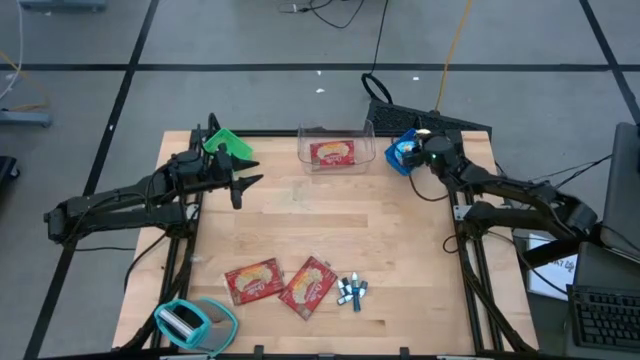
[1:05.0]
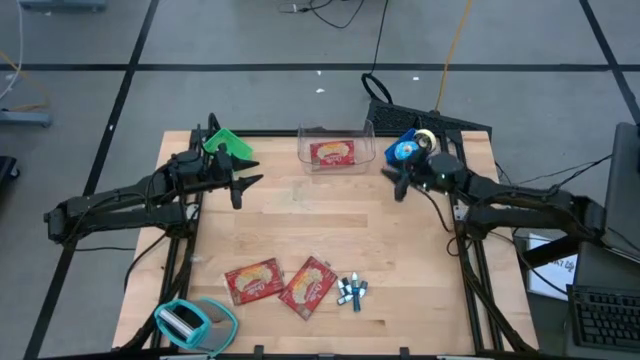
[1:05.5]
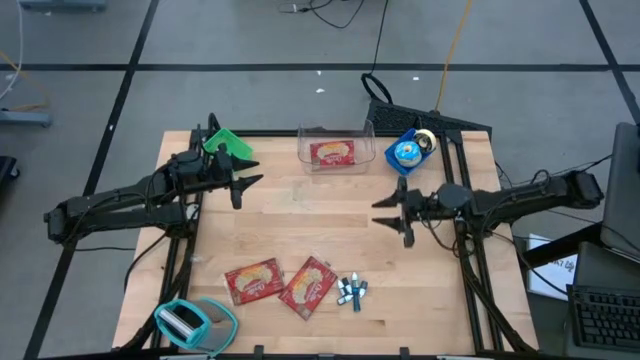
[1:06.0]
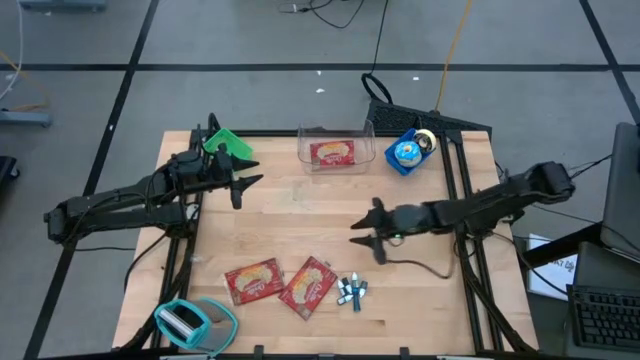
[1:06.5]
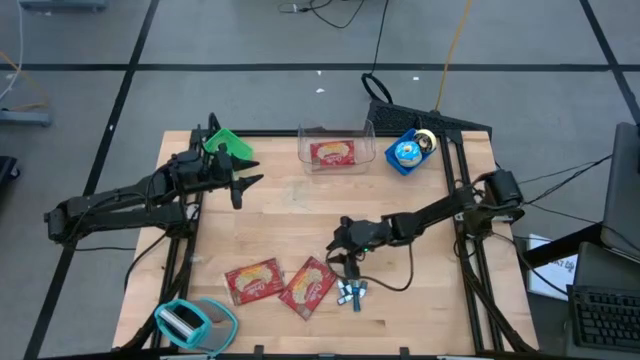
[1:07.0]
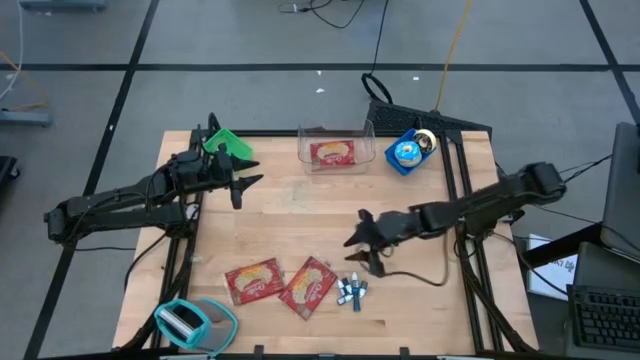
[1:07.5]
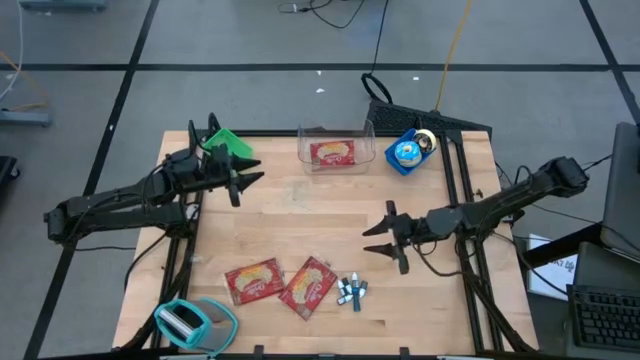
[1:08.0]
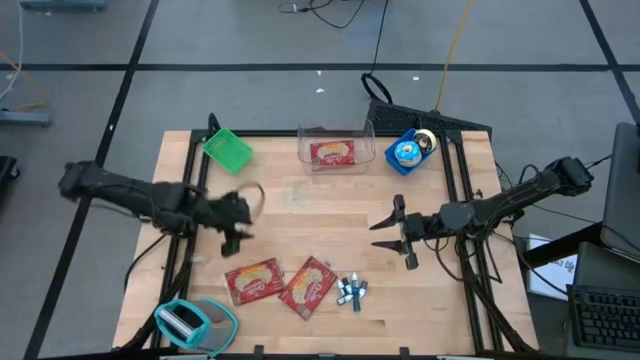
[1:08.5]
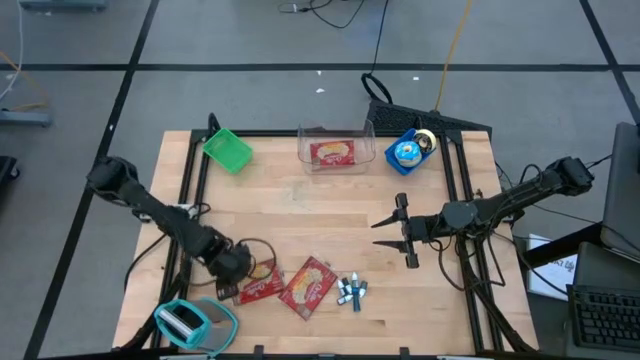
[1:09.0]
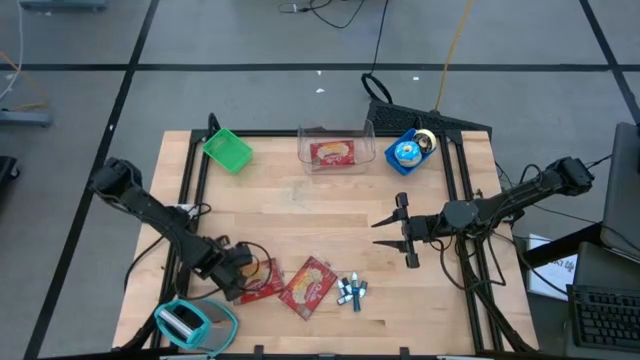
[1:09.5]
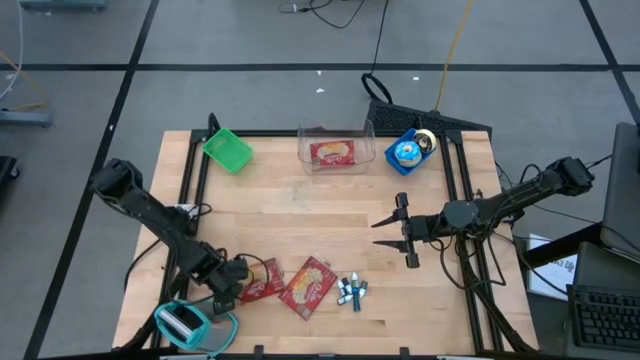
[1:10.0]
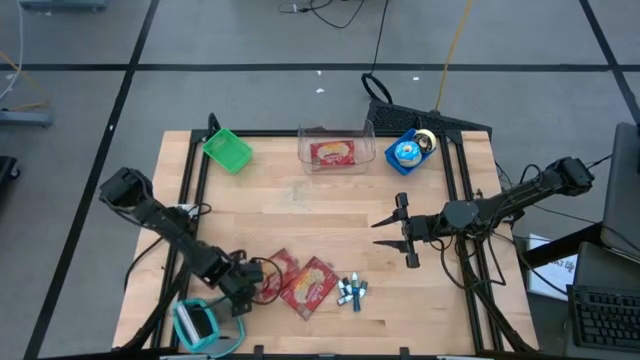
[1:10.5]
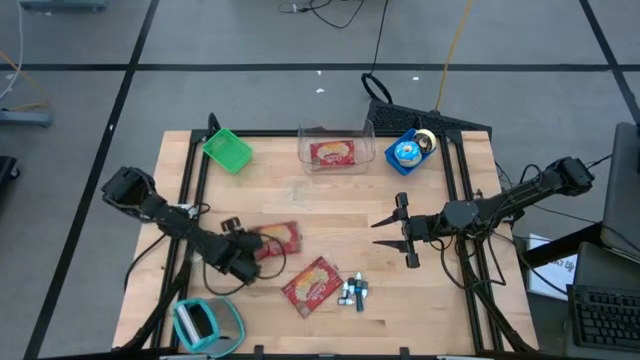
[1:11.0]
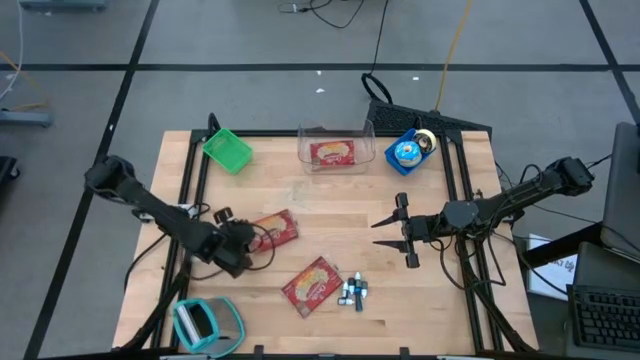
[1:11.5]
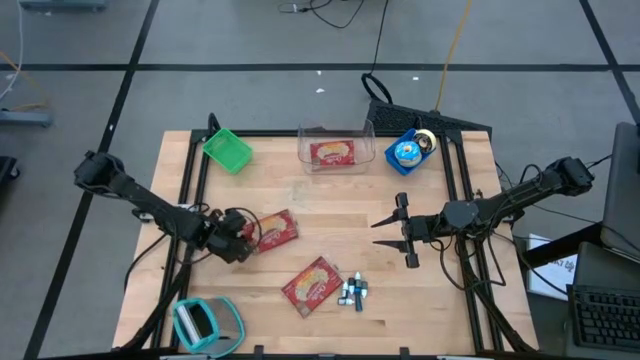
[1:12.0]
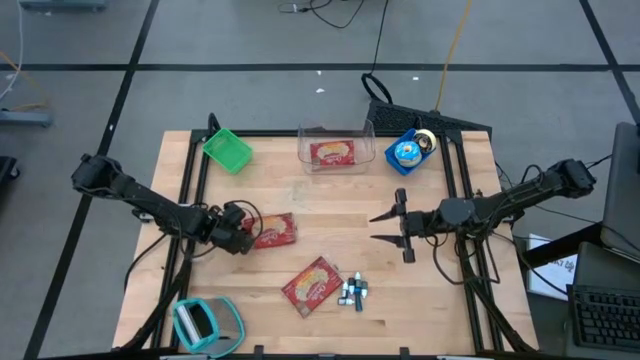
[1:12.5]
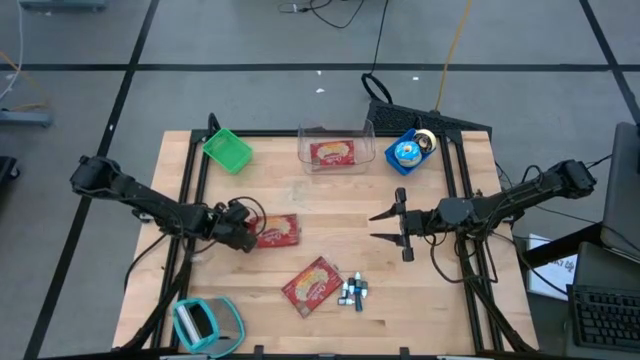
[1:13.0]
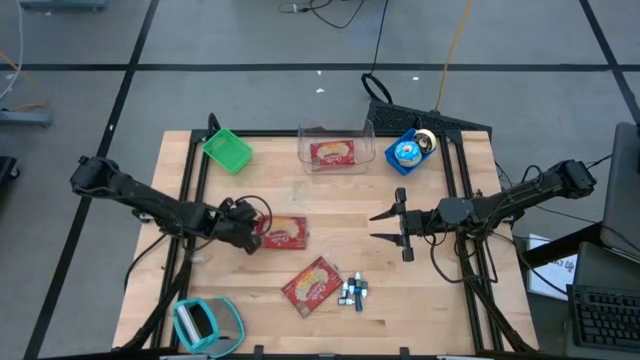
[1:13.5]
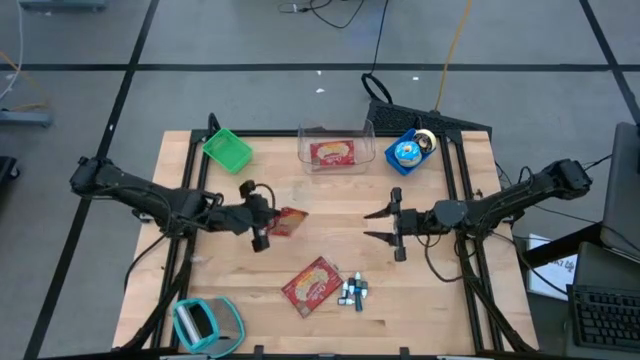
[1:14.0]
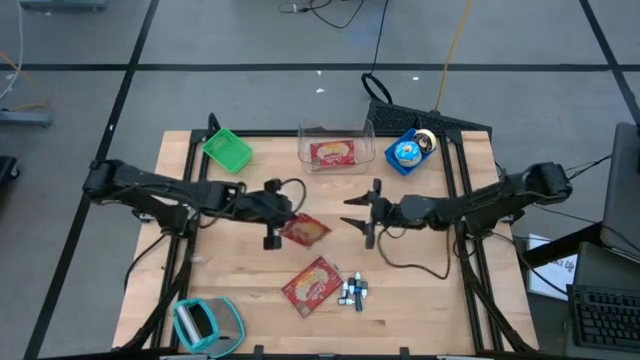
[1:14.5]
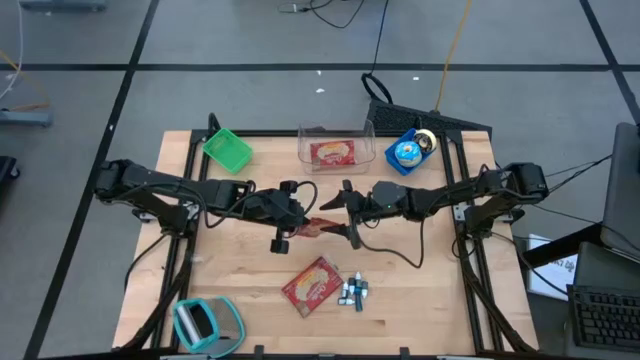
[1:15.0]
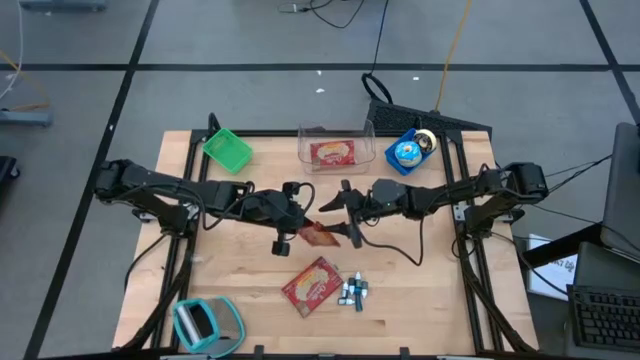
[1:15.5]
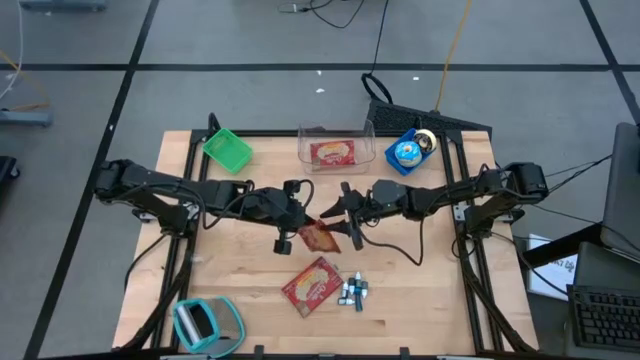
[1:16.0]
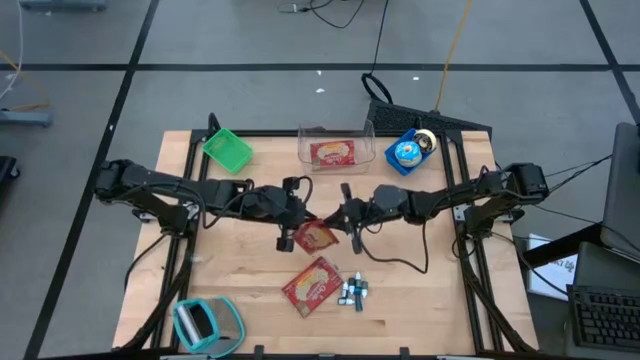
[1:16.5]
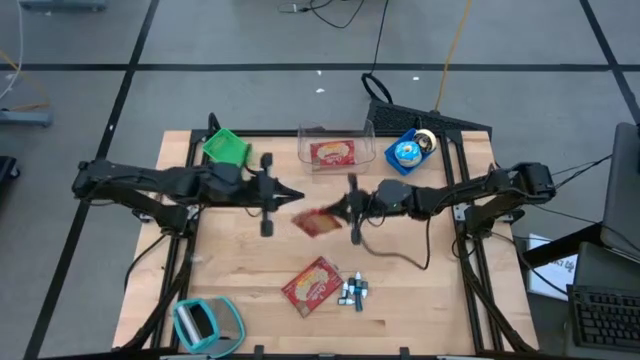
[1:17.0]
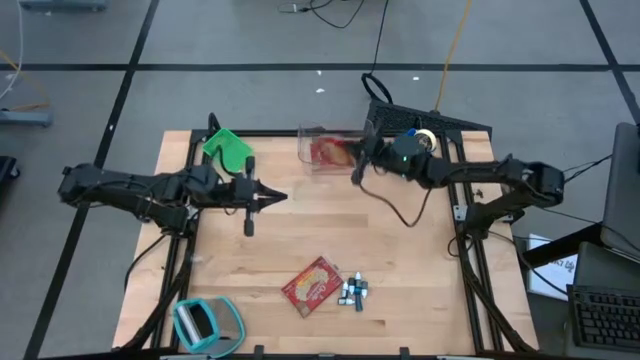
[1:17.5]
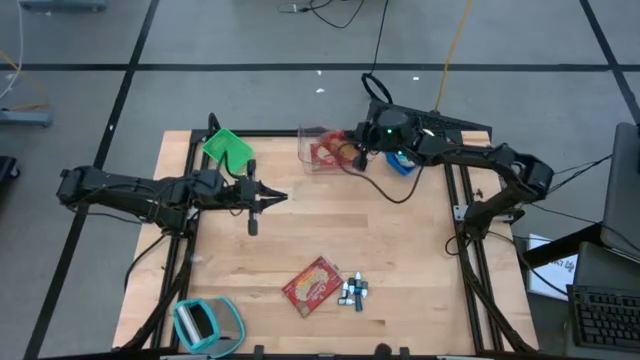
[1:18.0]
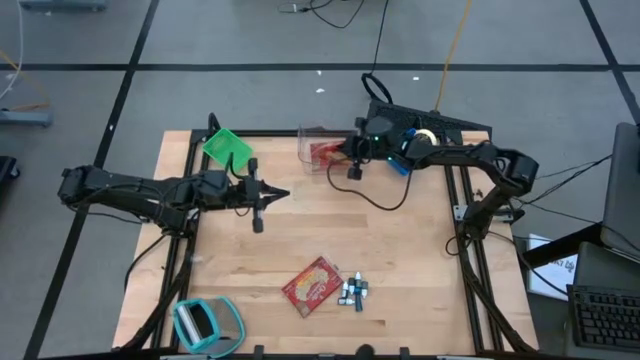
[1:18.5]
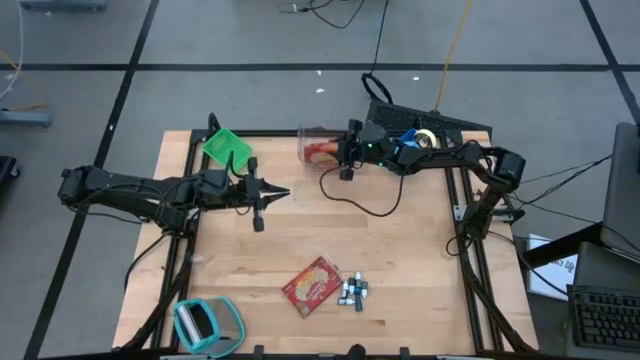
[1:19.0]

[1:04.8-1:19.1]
Put the left popcorn bag into the transparent bin
